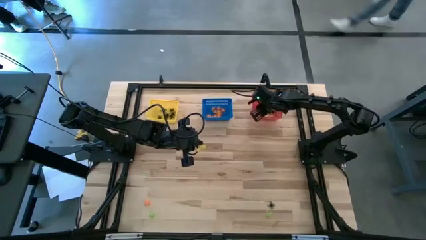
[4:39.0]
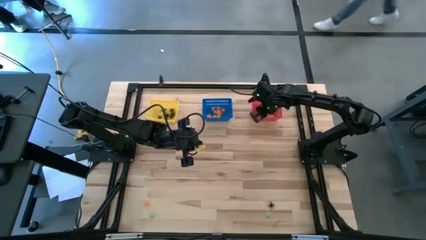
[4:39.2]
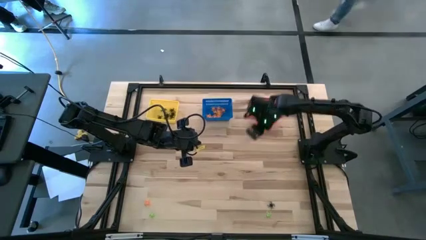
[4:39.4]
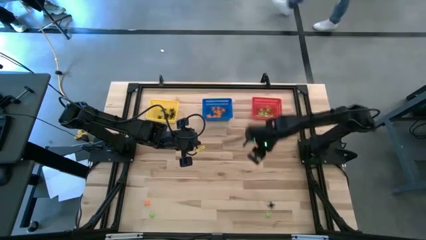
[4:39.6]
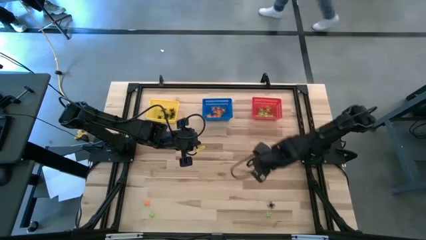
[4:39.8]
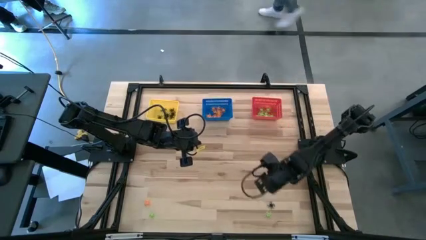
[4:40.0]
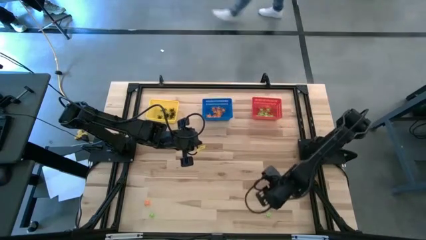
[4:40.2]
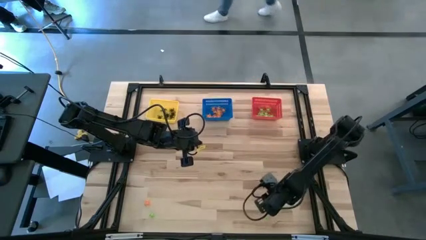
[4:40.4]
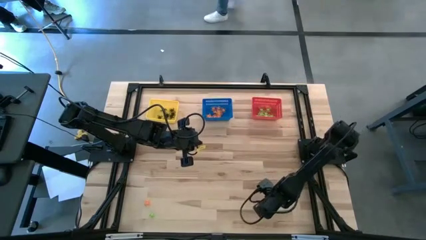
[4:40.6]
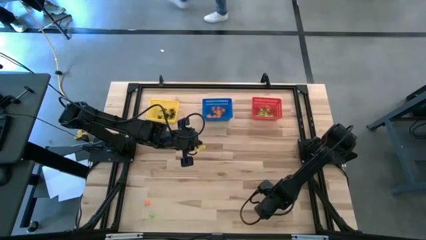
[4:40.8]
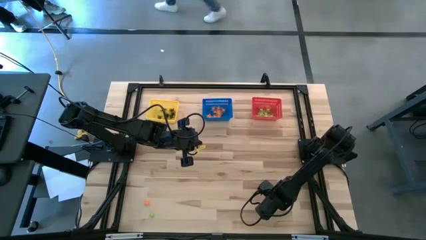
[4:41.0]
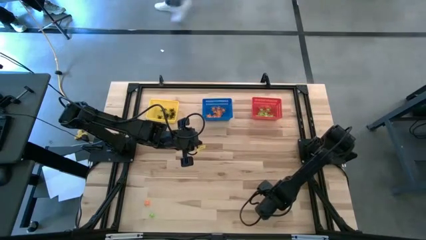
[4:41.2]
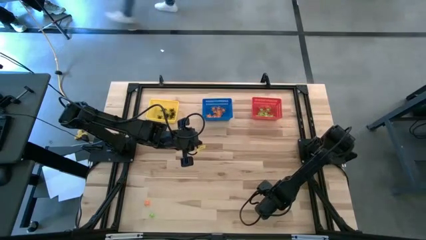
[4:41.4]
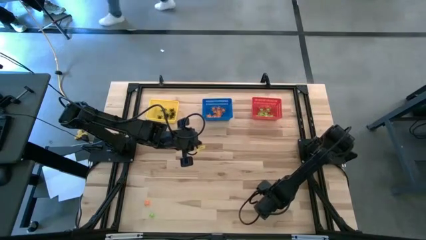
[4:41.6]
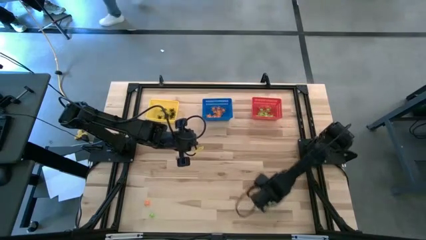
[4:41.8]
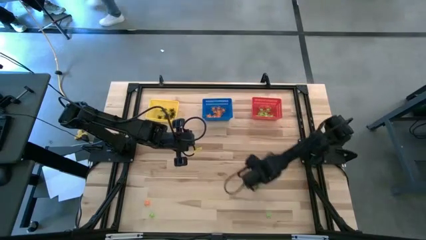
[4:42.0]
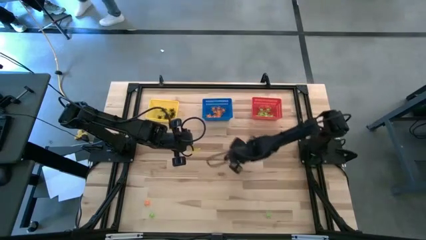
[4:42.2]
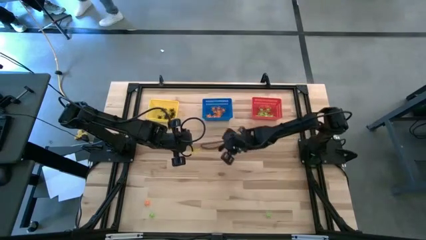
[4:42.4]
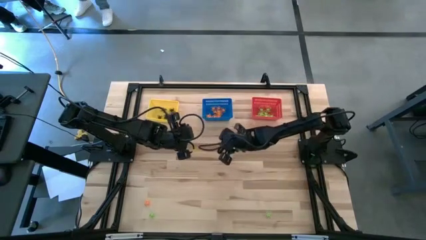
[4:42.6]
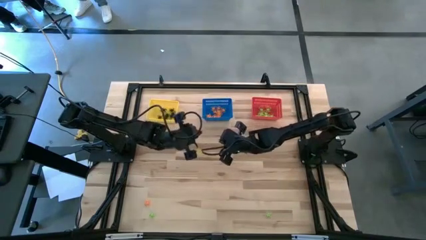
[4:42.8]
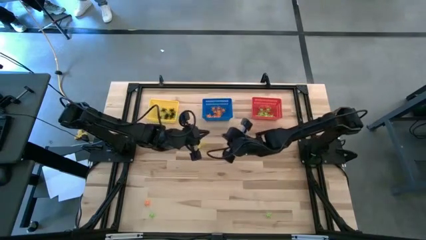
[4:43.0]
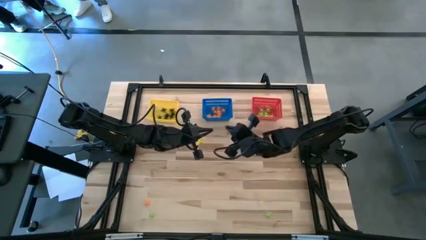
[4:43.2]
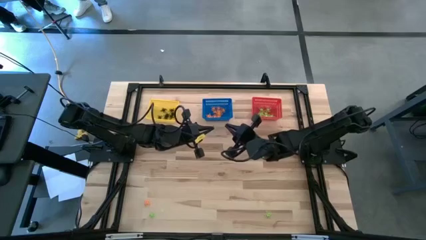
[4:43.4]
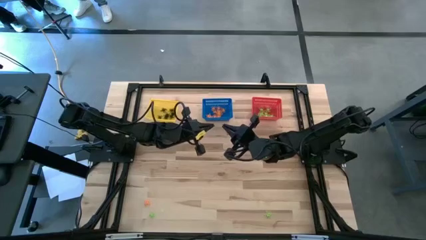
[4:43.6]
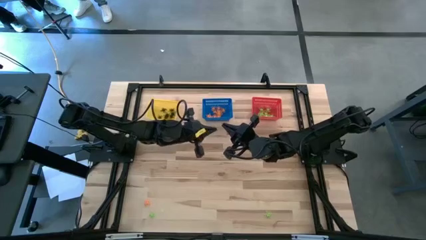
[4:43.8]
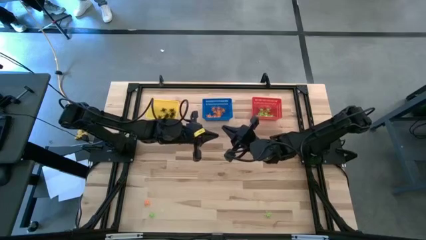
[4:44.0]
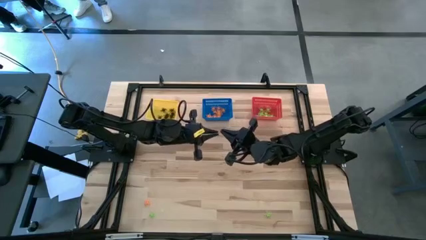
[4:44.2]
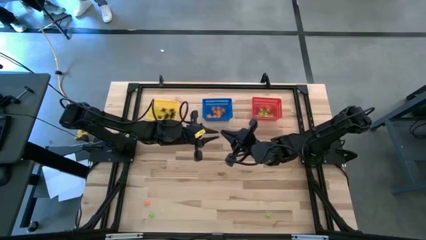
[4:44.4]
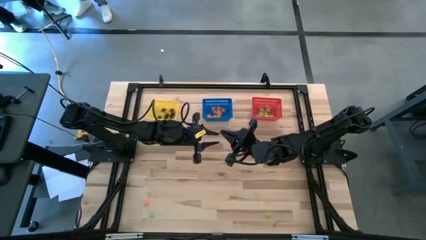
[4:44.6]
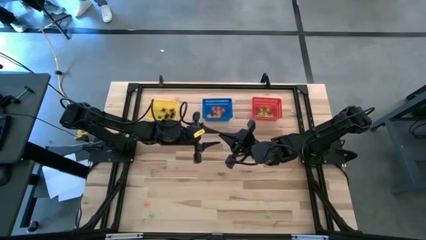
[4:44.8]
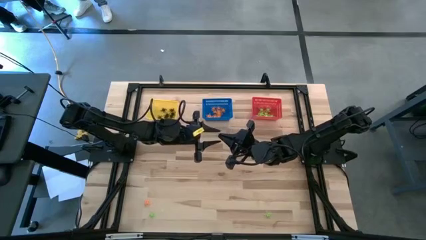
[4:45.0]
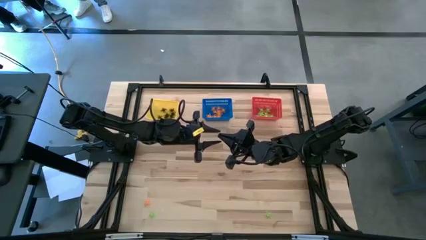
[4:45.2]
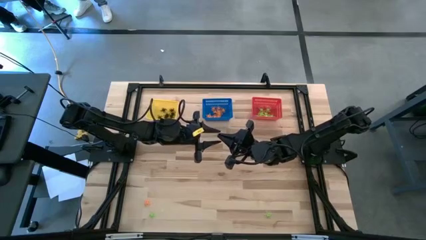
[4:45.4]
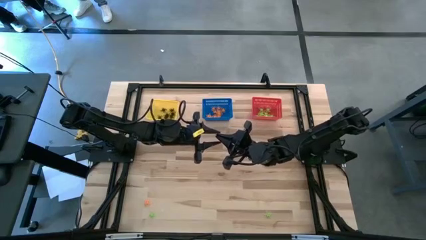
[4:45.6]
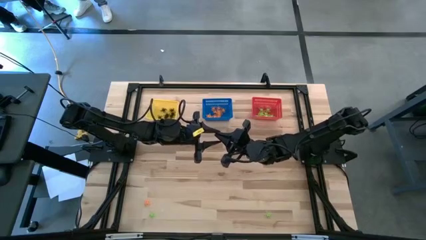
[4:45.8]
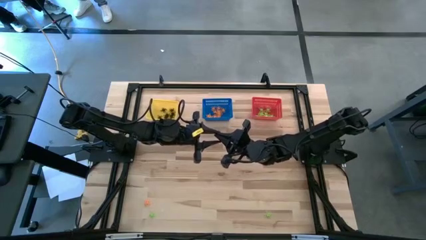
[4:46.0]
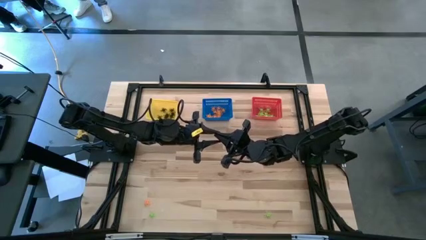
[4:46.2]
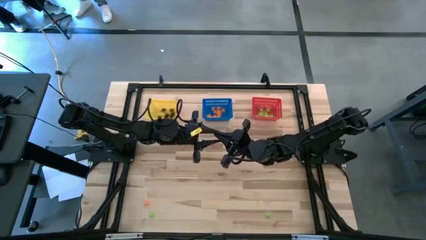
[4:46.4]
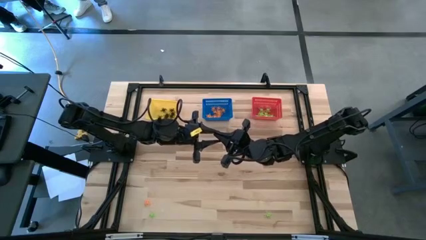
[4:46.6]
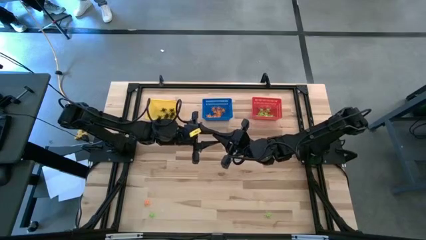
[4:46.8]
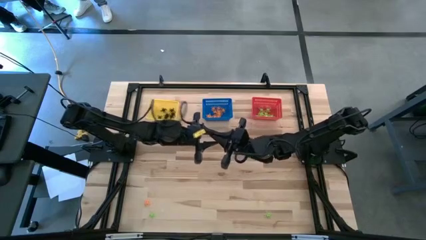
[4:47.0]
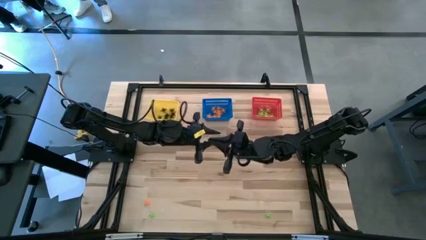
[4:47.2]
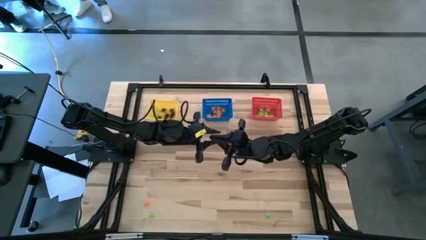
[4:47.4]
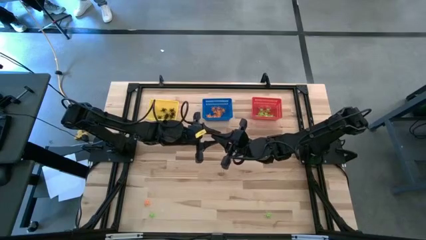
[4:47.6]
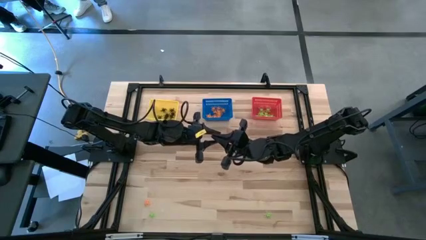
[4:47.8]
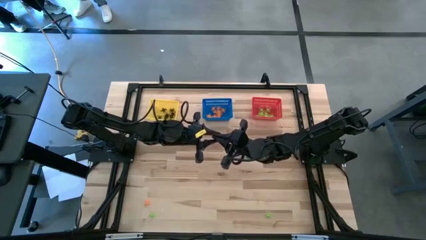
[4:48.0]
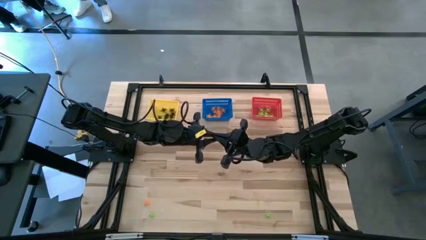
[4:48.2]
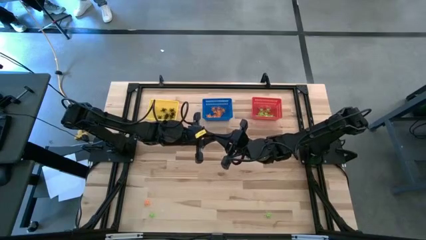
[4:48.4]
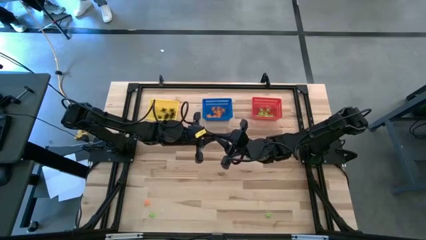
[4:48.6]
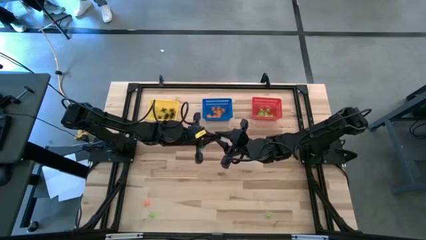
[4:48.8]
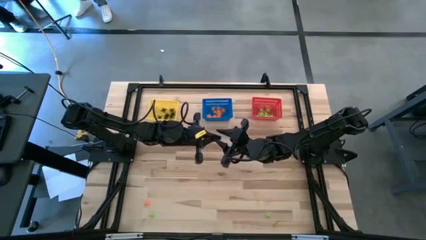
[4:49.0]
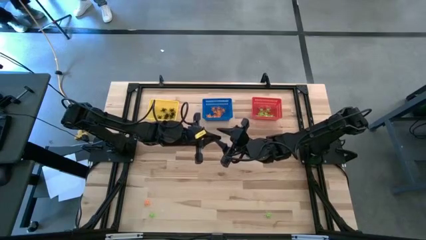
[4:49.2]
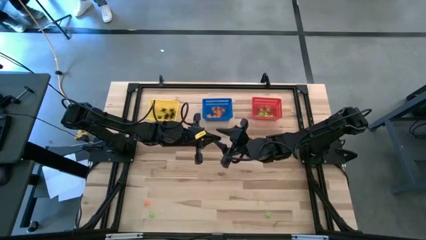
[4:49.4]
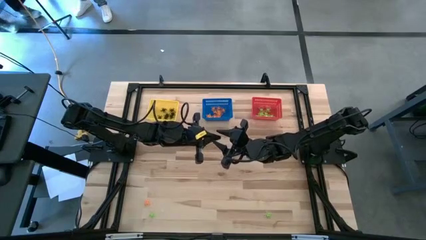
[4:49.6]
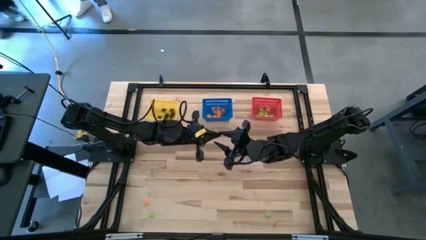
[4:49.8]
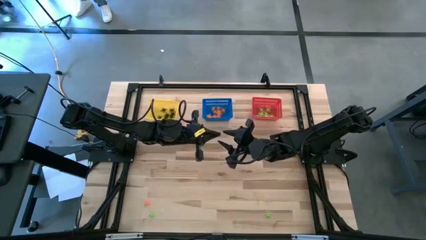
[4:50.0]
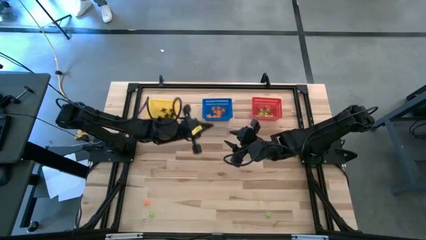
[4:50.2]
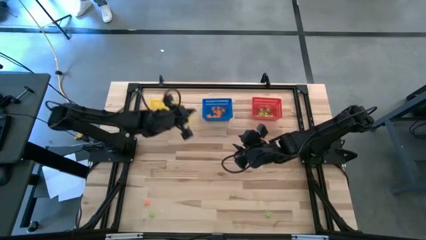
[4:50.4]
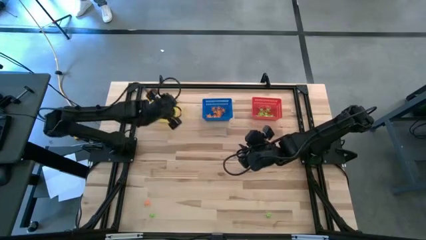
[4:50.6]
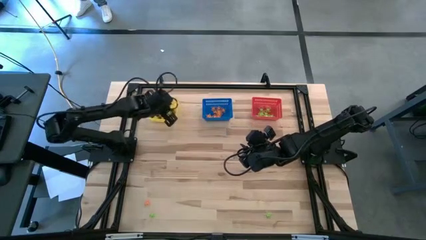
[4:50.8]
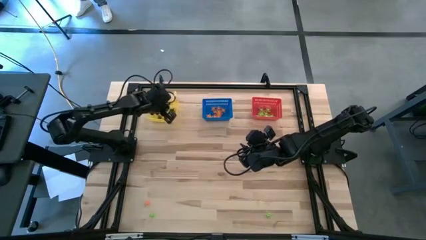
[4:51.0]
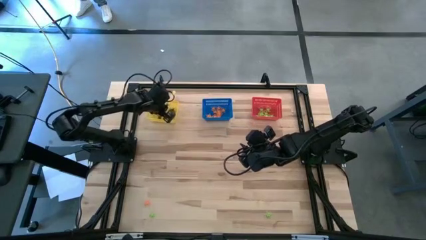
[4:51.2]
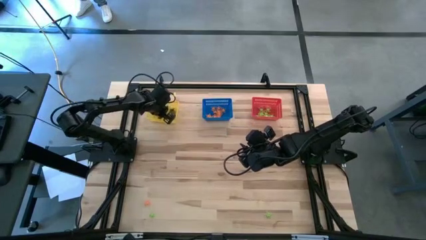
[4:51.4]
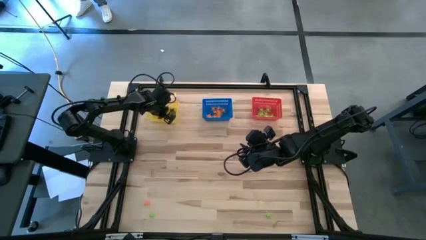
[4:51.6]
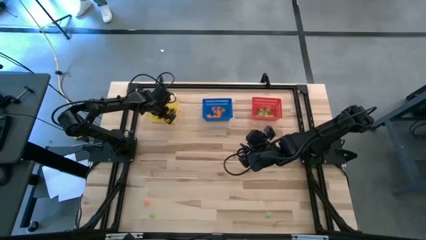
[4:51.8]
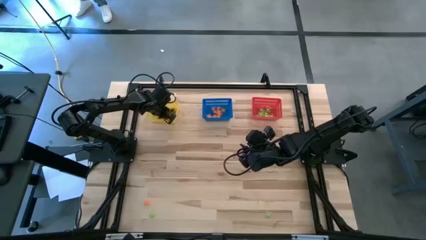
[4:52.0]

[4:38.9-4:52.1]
Task: Sort Halloween decoration
Put the black spider toy into the yellow basket

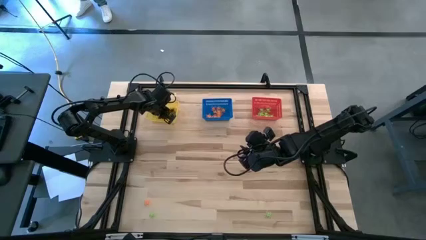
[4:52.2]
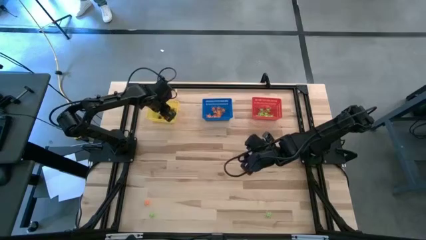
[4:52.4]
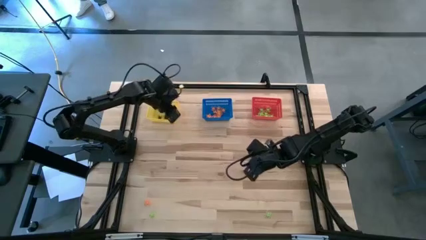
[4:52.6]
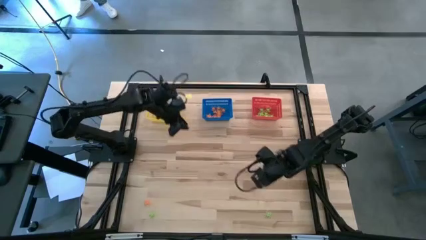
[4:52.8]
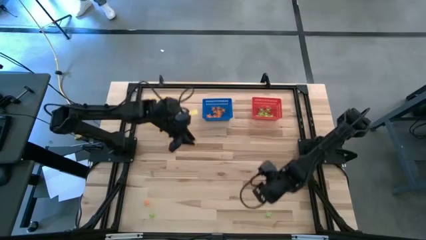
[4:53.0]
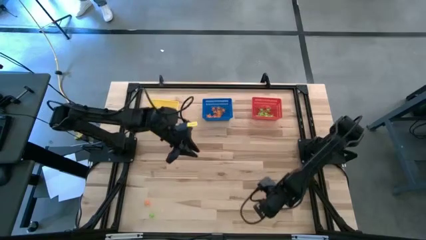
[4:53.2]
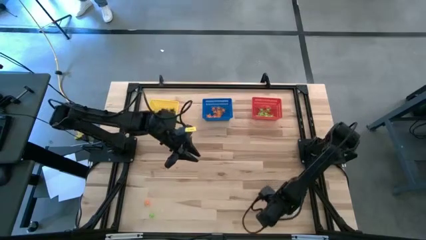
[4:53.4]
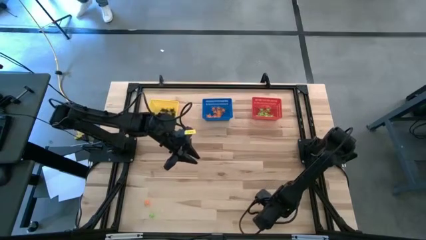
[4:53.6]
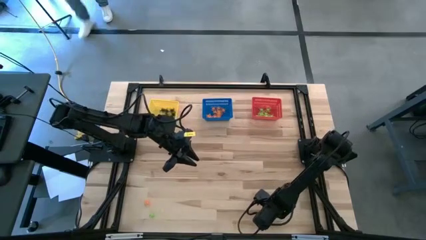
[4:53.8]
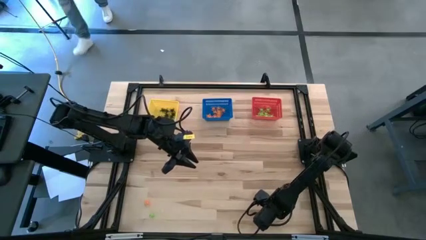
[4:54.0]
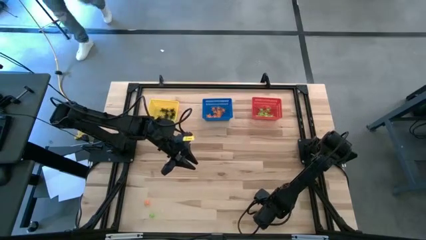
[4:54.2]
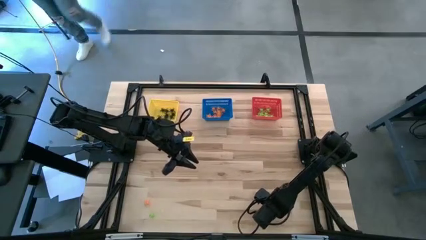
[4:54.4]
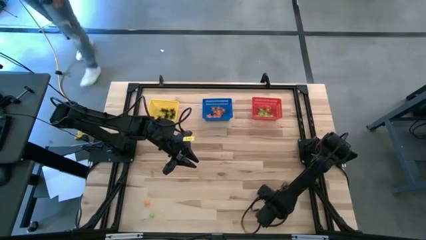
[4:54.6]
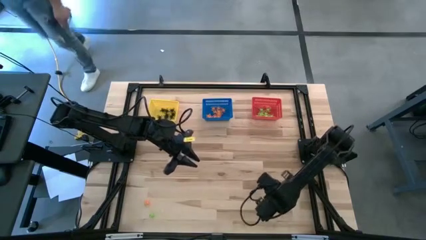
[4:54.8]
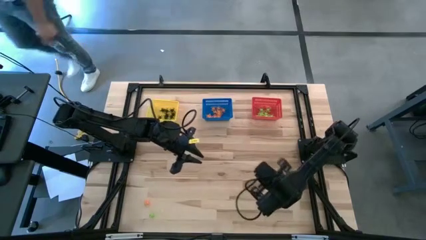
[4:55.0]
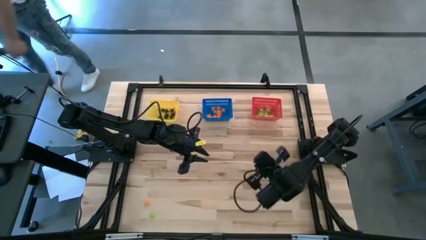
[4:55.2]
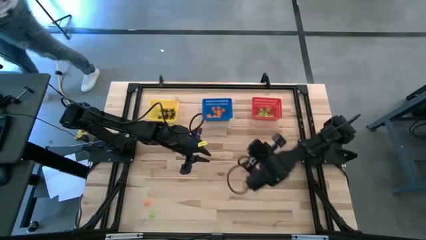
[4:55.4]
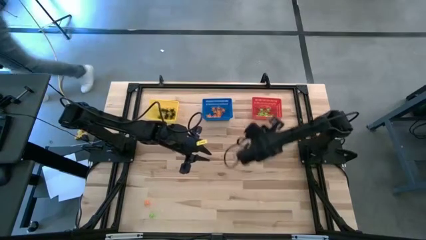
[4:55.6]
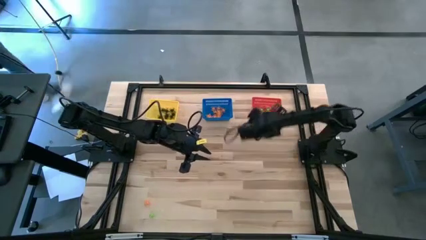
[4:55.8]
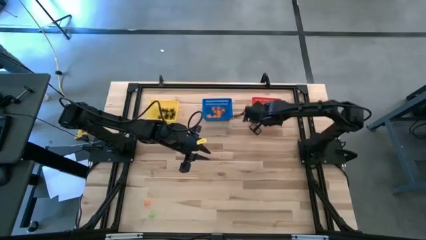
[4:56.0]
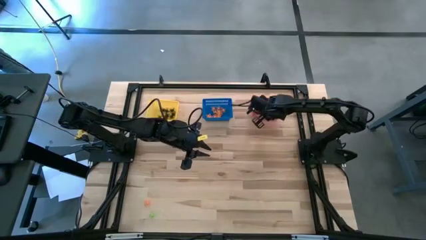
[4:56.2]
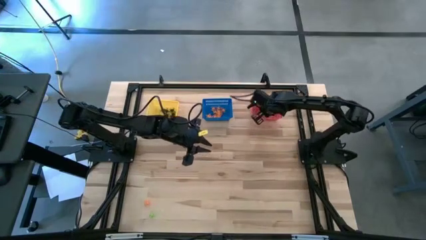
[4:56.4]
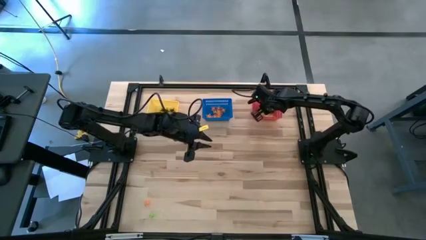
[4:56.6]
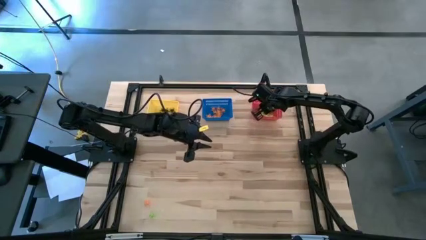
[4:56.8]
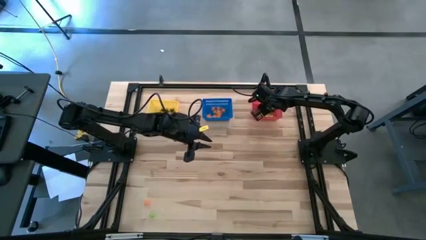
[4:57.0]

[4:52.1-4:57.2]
Put the green spider toy into the red basket
